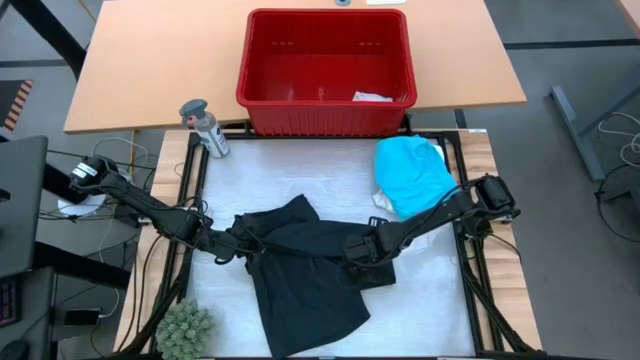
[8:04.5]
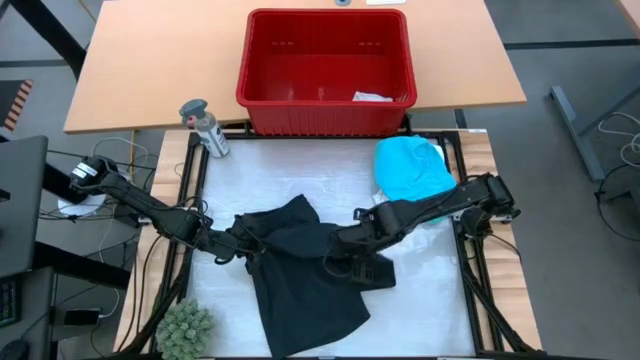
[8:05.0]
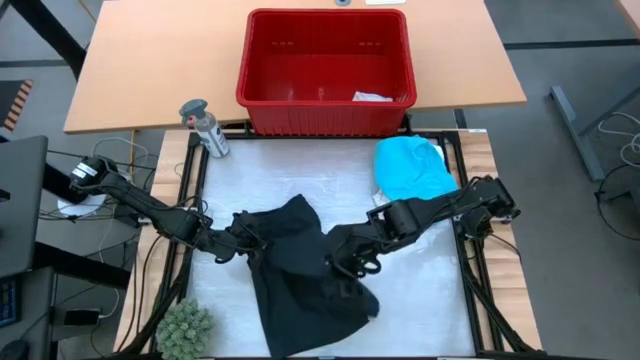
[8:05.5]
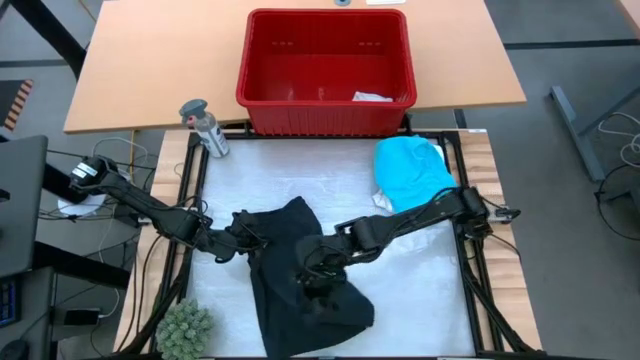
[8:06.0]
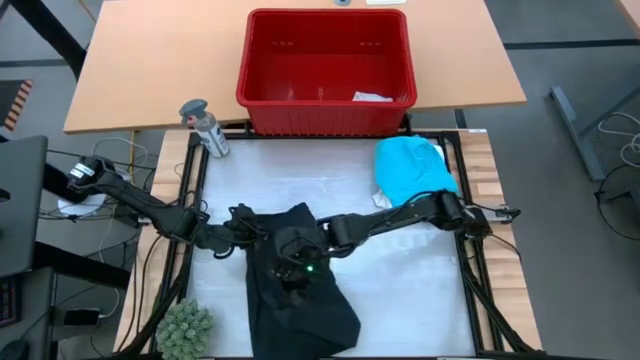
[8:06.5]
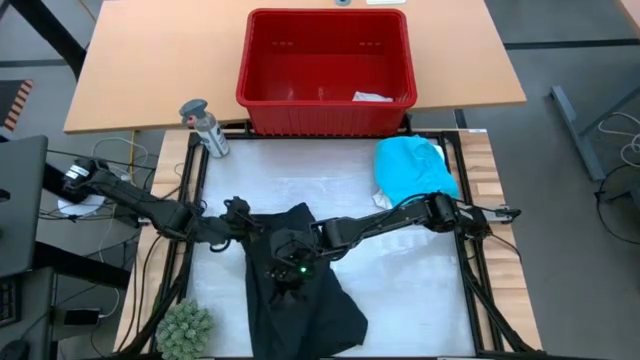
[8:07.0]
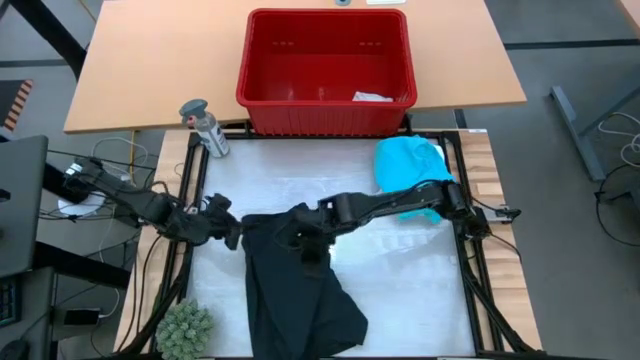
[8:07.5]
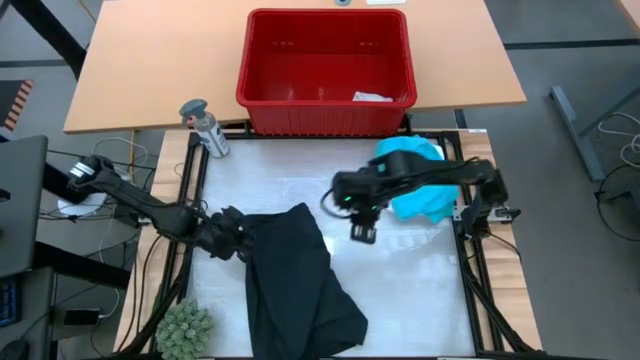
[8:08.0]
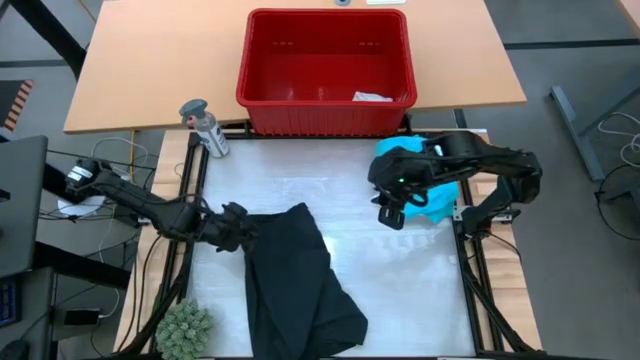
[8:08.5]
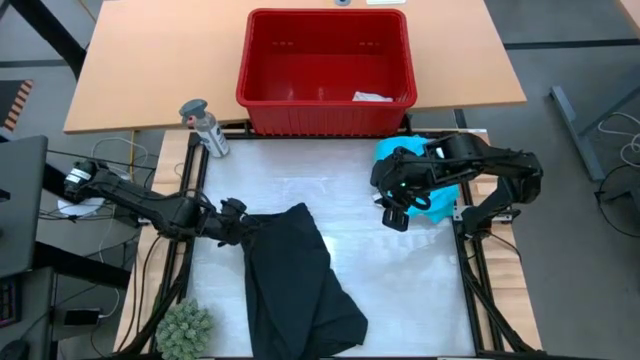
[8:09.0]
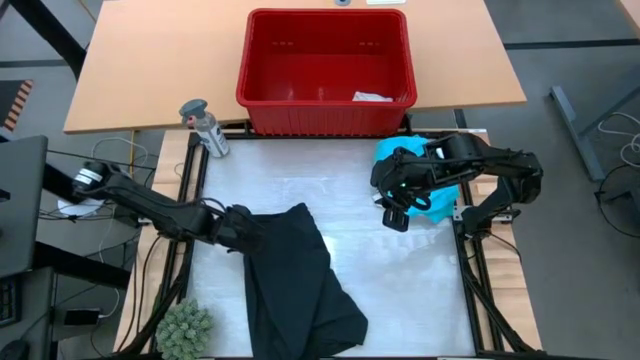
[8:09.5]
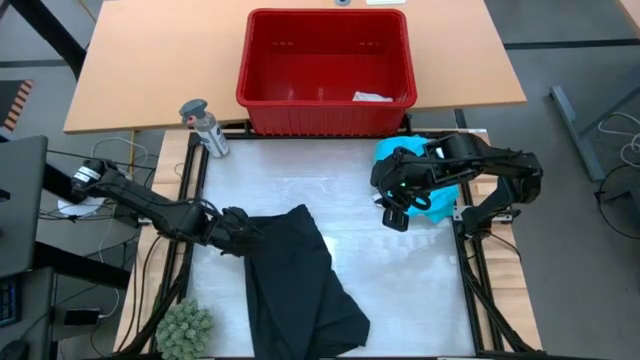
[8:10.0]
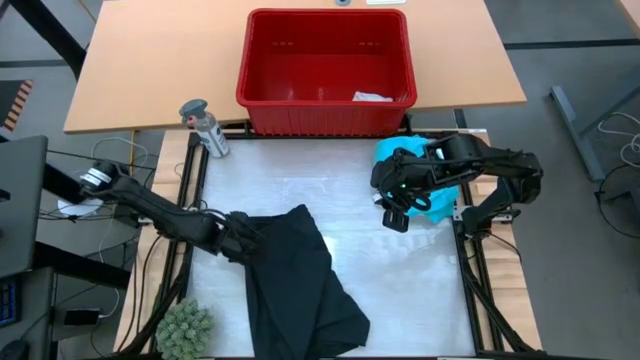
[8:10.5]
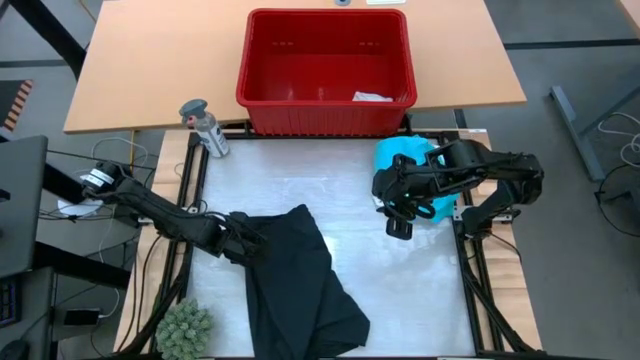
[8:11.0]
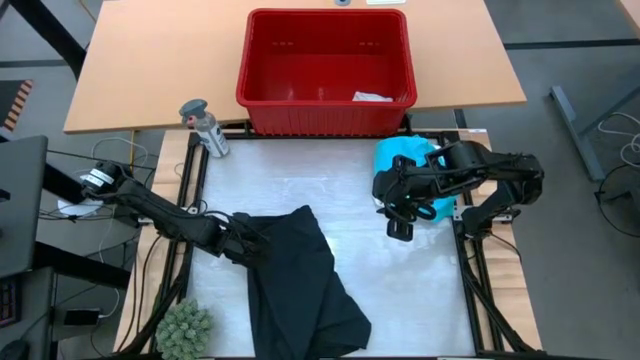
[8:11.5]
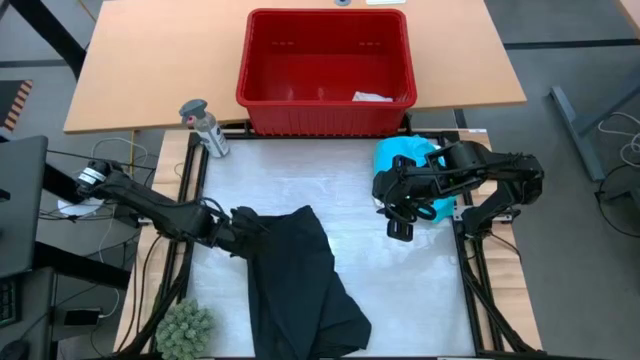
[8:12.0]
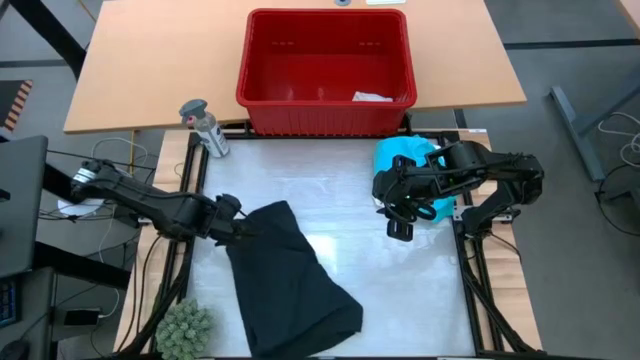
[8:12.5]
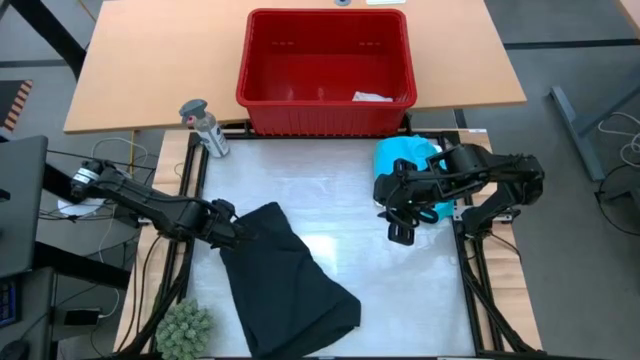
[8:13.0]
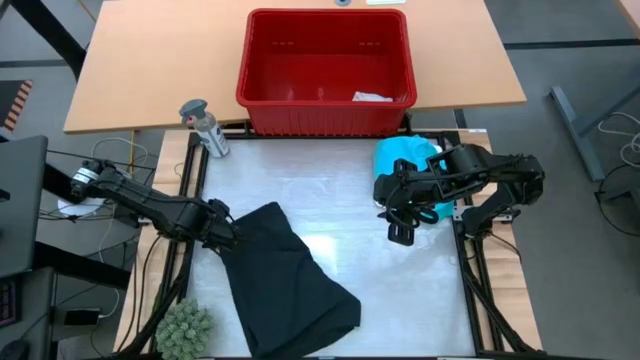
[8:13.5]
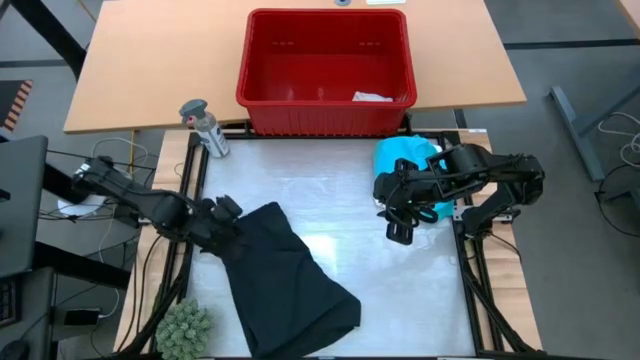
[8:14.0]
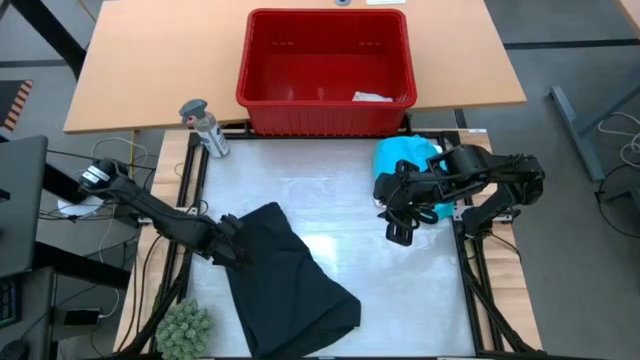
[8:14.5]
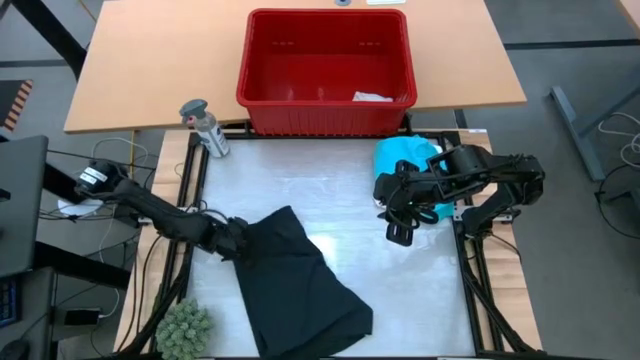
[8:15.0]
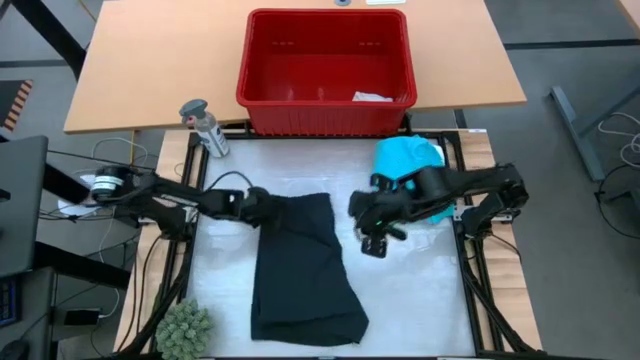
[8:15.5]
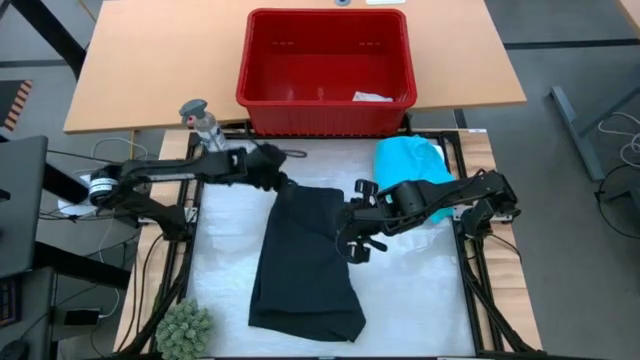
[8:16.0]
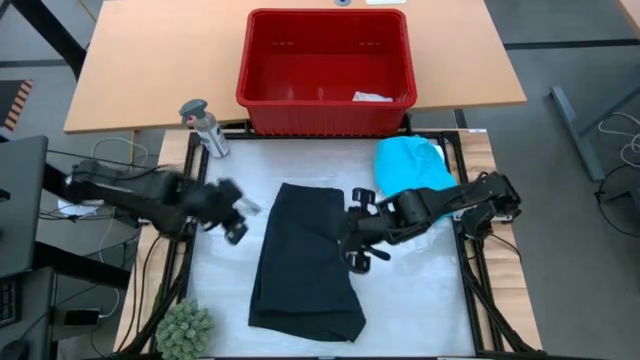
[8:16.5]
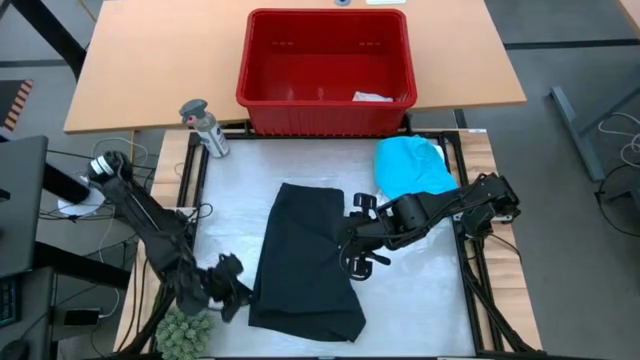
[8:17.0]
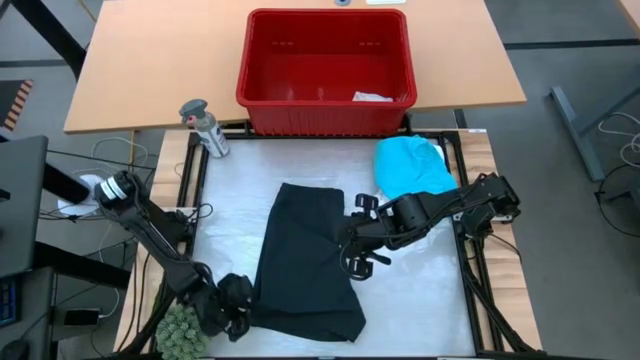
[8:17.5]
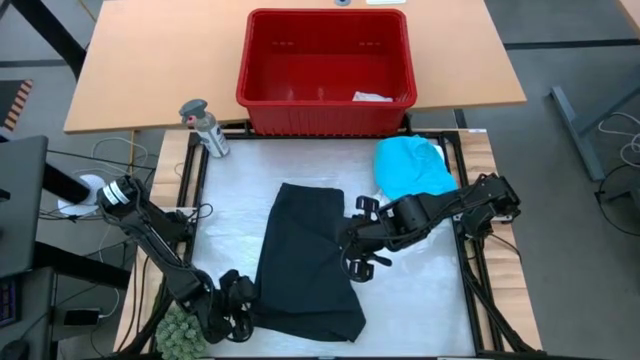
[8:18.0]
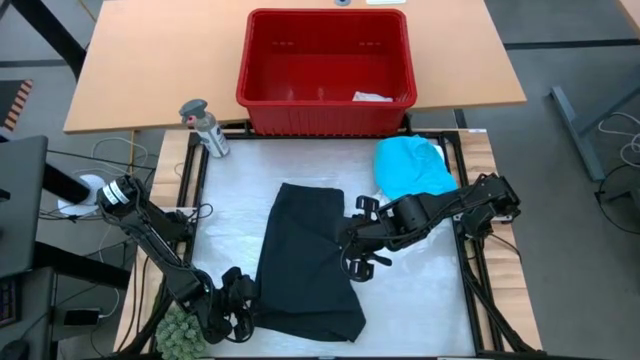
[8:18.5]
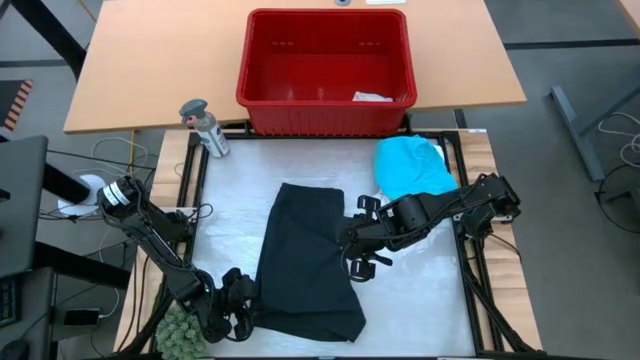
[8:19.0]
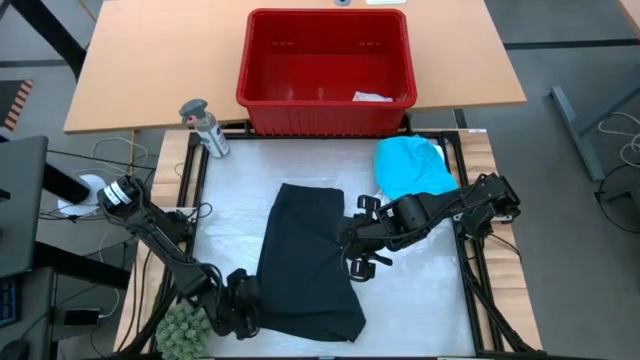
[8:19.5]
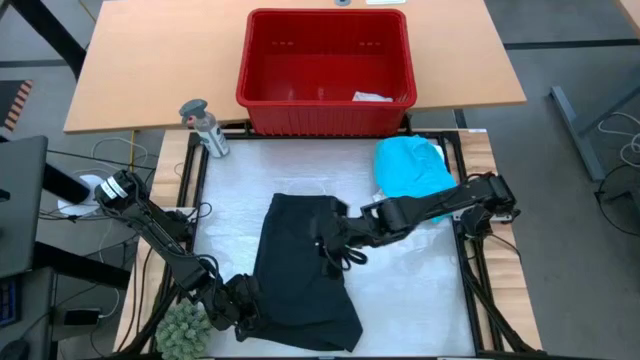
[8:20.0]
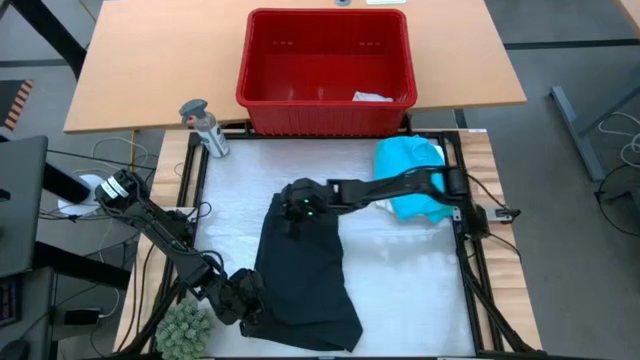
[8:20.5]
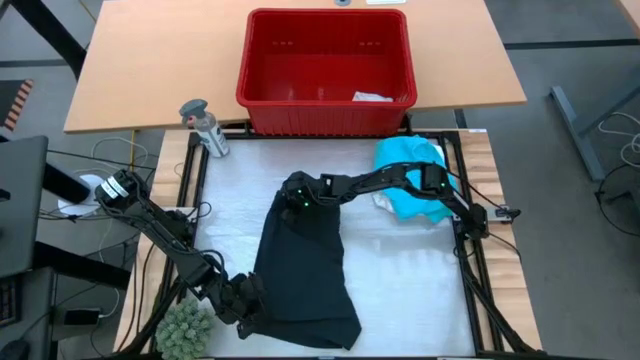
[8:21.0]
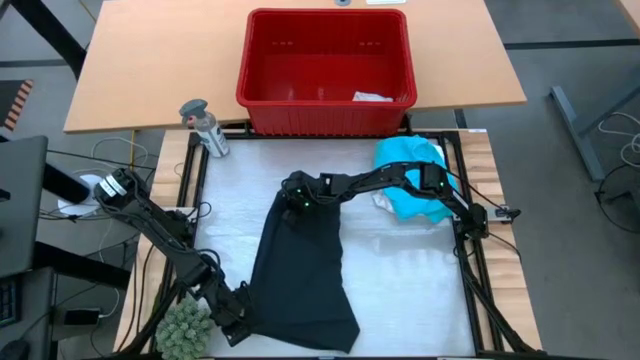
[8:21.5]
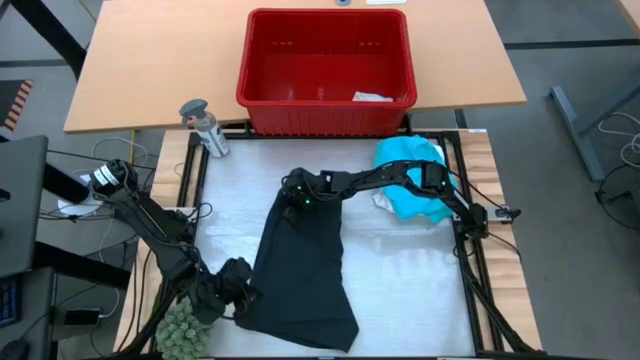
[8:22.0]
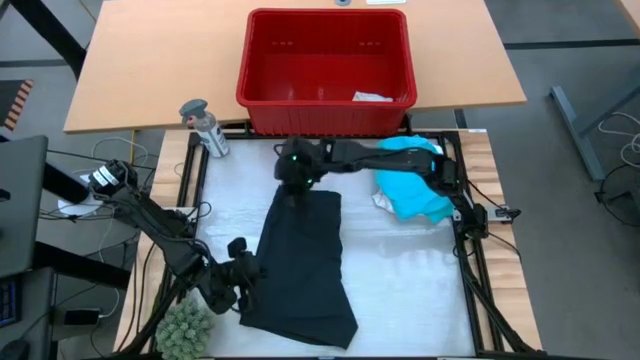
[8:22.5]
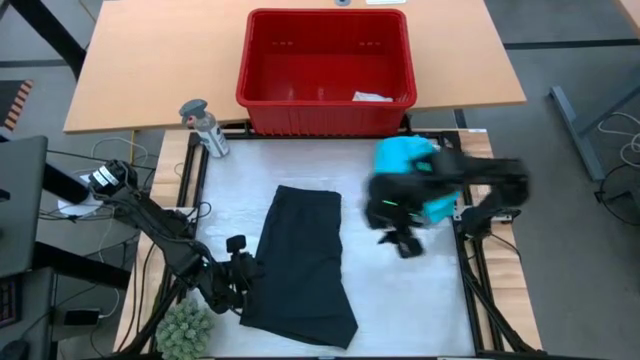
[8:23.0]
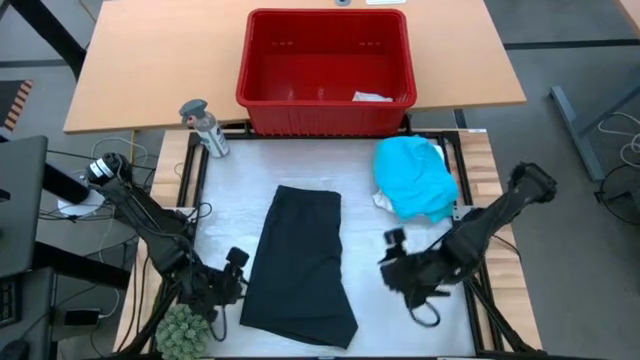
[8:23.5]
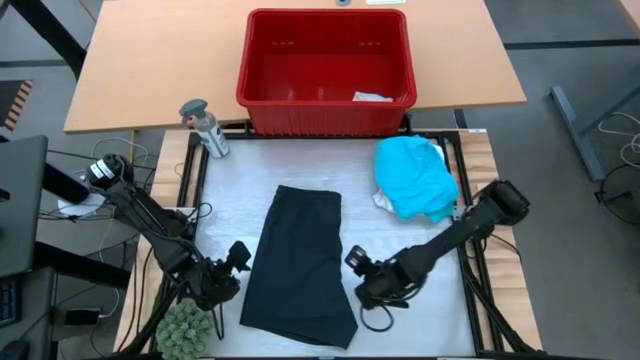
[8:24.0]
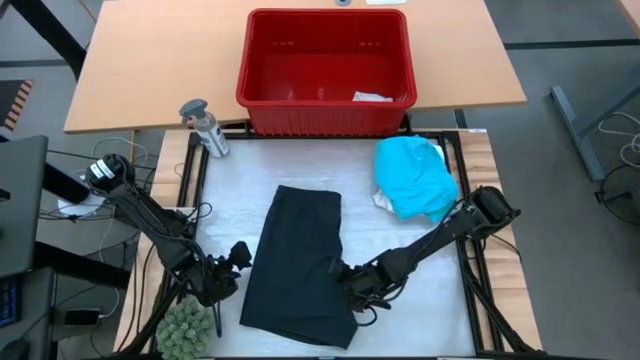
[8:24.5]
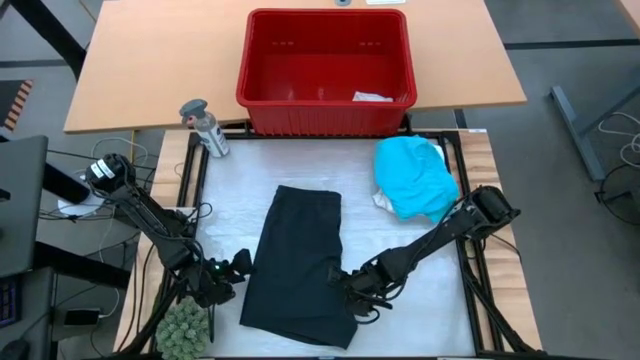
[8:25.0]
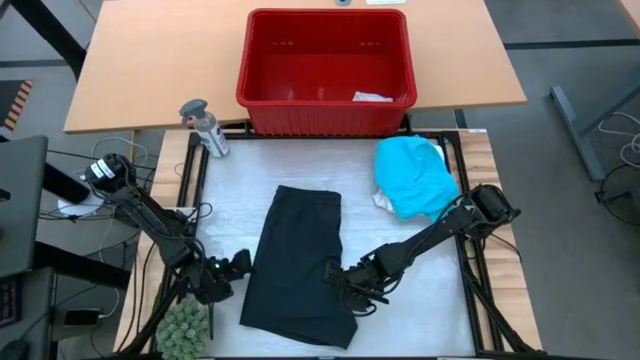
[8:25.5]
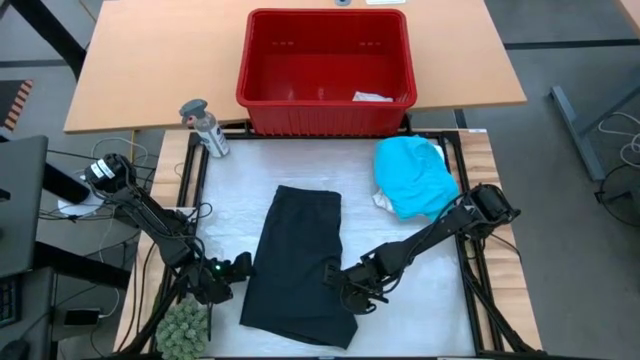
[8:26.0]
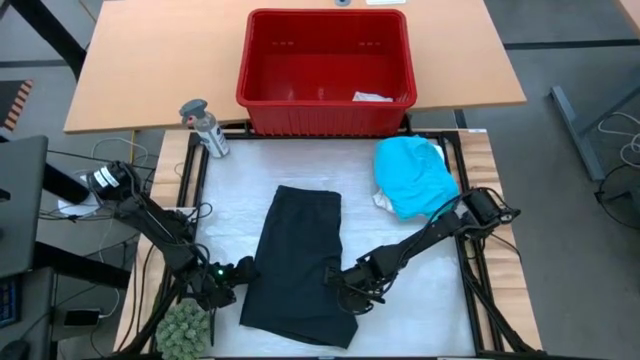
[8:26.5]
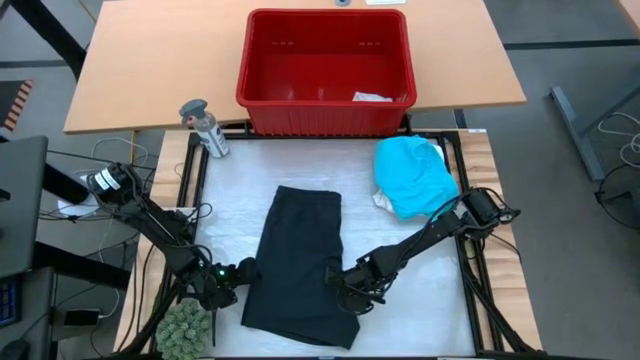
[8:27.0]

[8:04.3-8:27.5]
Task: Fold Laundry from Bin
Fold the black shorts
